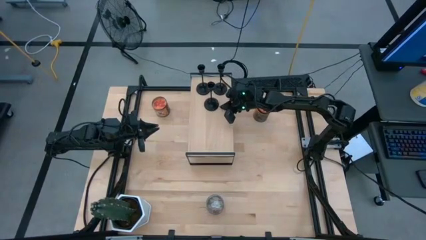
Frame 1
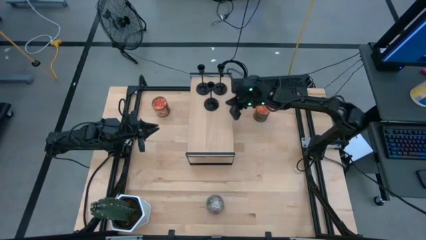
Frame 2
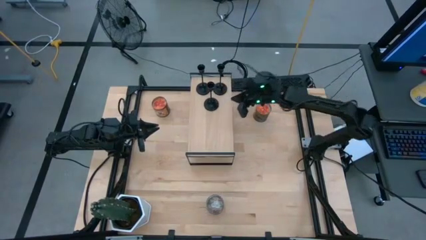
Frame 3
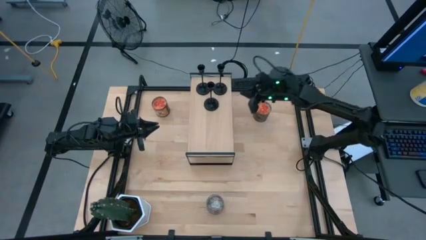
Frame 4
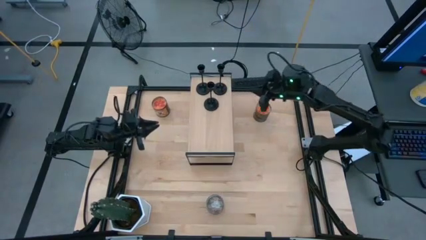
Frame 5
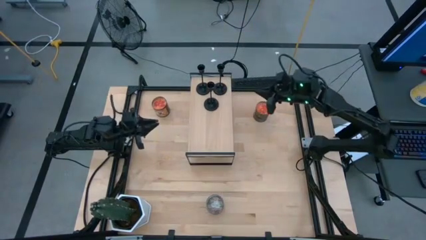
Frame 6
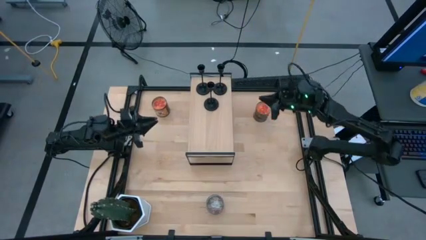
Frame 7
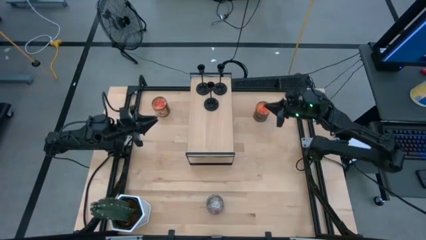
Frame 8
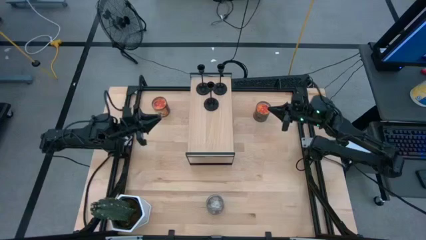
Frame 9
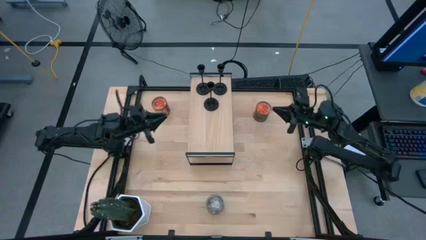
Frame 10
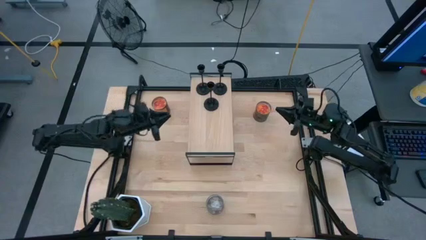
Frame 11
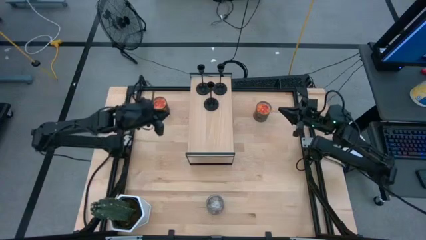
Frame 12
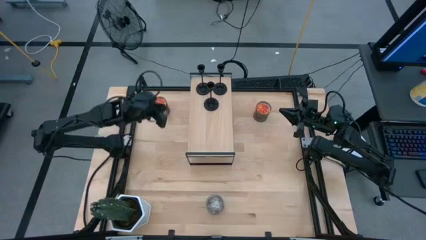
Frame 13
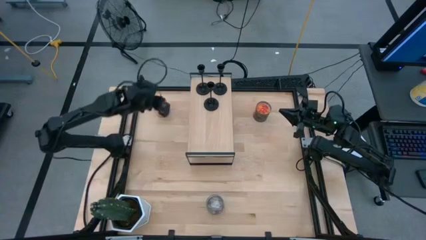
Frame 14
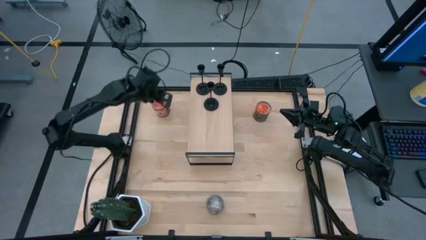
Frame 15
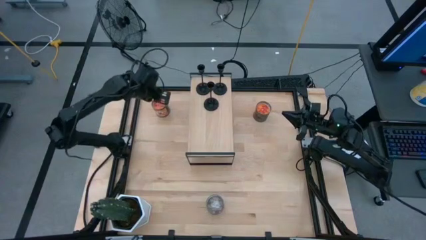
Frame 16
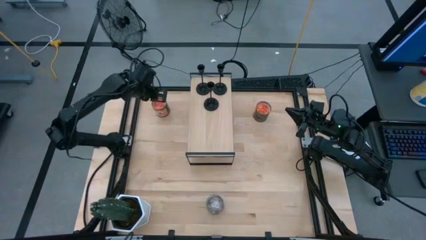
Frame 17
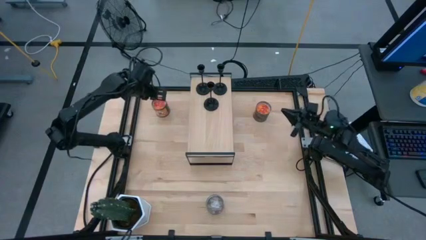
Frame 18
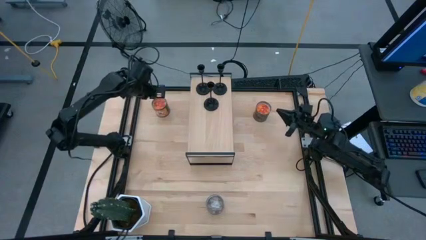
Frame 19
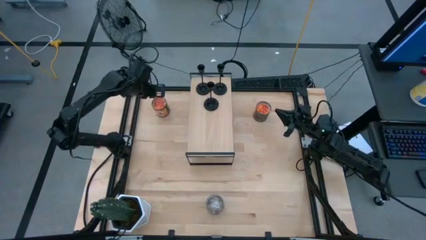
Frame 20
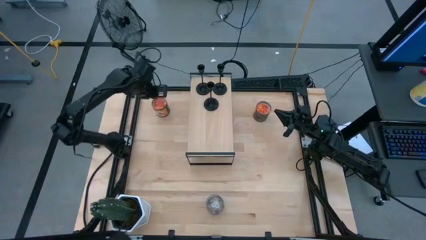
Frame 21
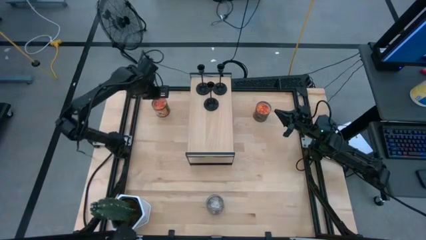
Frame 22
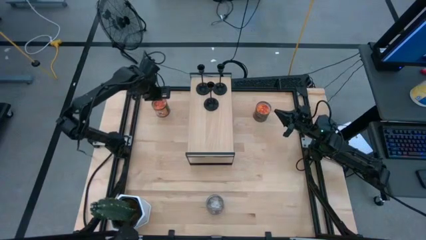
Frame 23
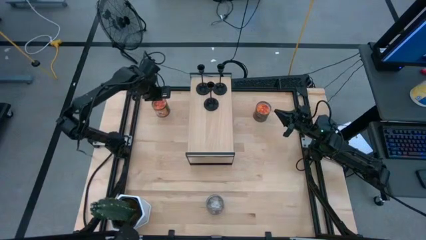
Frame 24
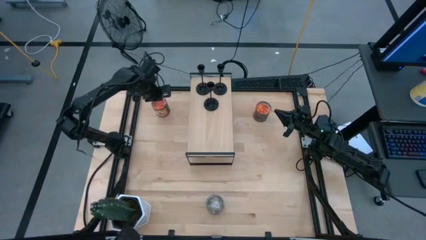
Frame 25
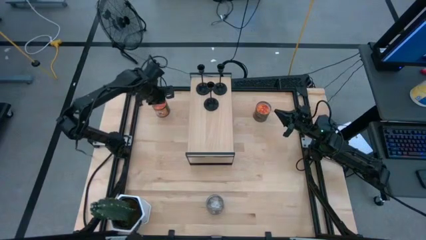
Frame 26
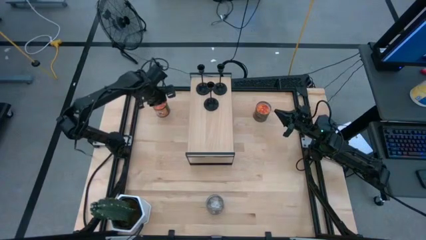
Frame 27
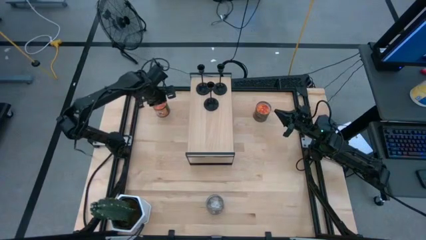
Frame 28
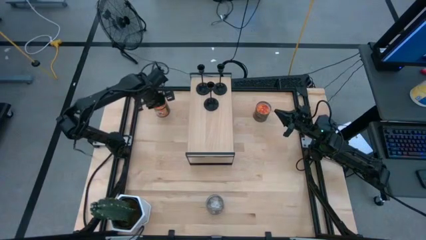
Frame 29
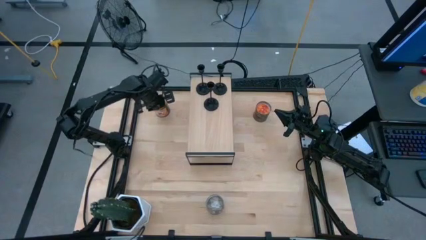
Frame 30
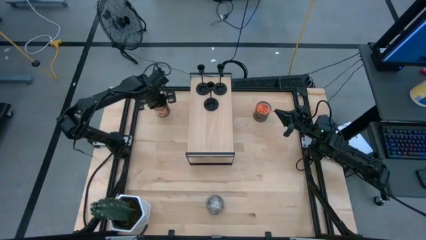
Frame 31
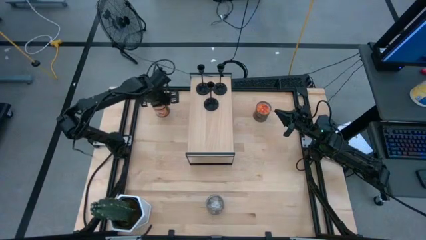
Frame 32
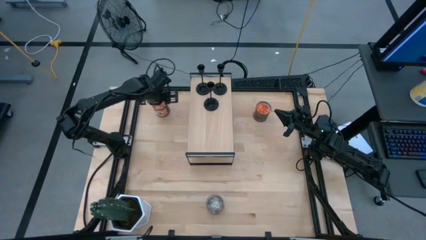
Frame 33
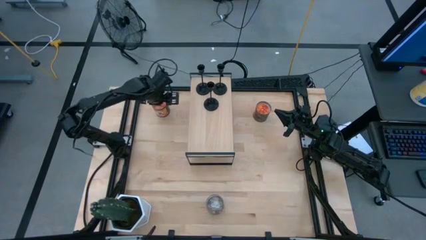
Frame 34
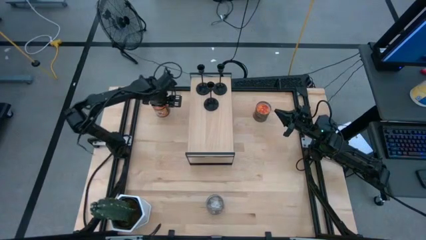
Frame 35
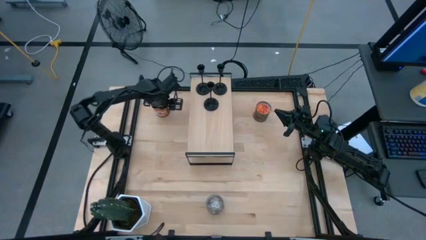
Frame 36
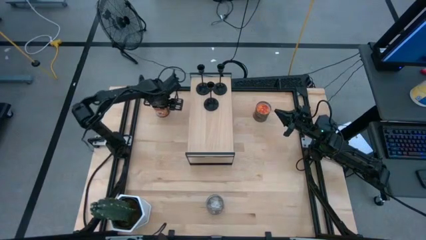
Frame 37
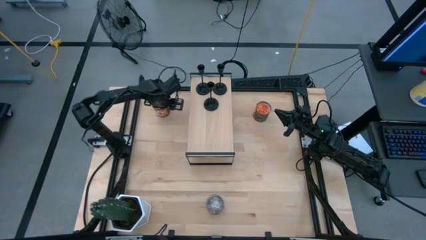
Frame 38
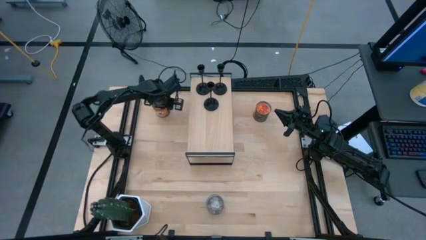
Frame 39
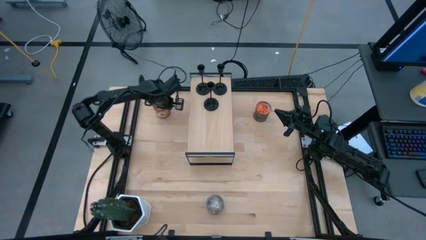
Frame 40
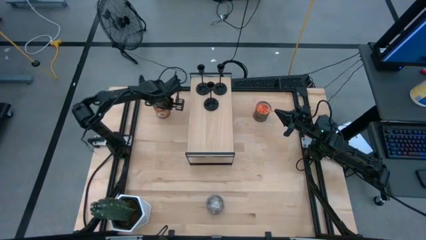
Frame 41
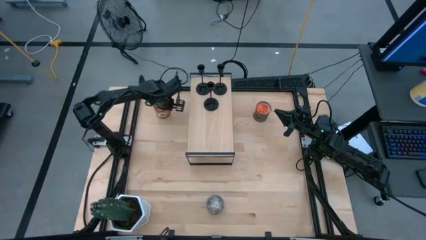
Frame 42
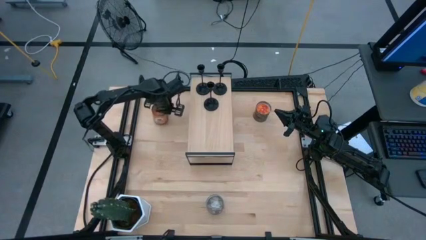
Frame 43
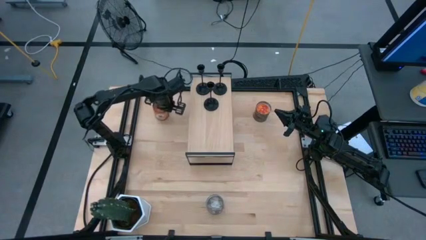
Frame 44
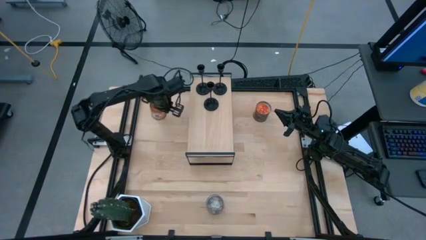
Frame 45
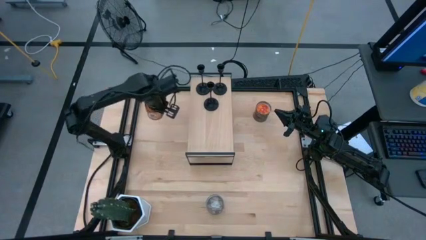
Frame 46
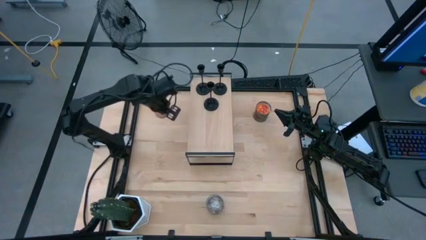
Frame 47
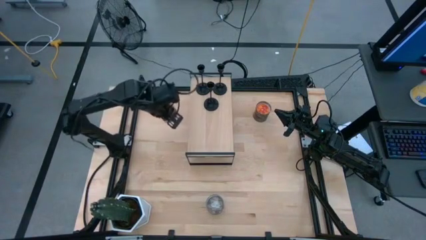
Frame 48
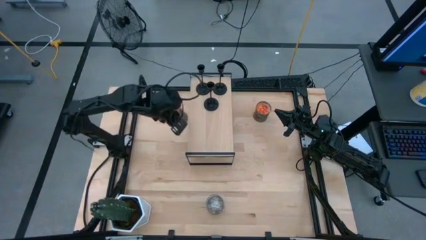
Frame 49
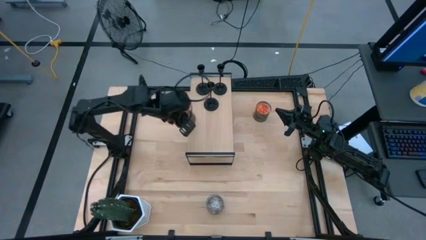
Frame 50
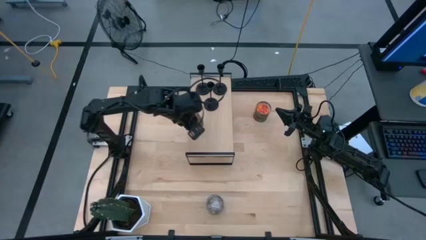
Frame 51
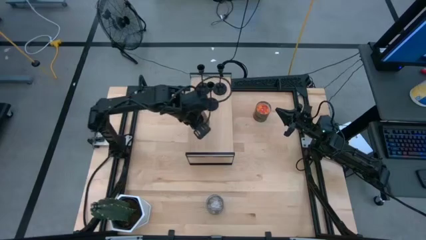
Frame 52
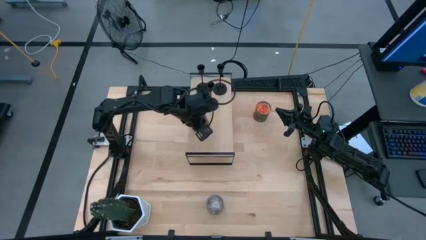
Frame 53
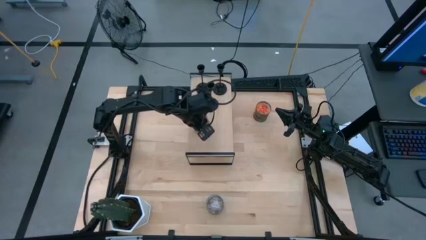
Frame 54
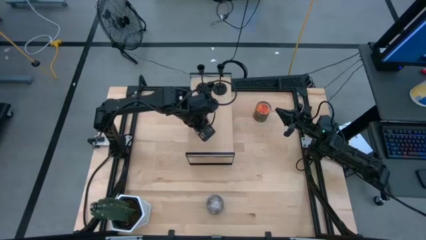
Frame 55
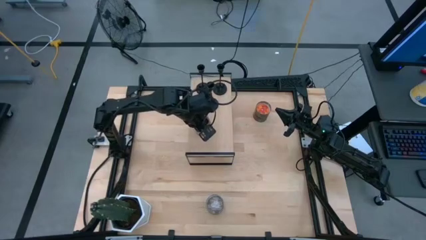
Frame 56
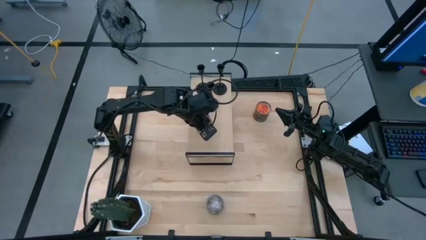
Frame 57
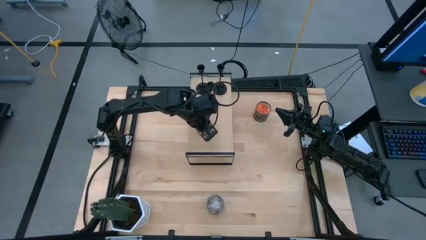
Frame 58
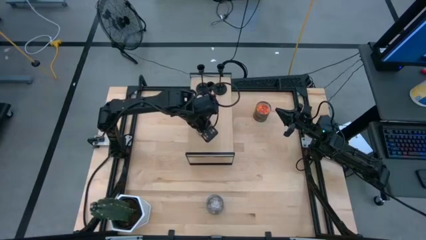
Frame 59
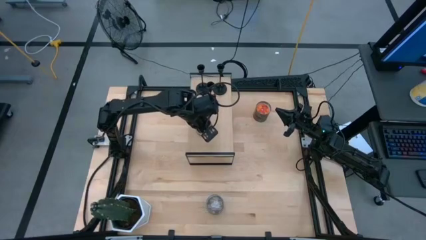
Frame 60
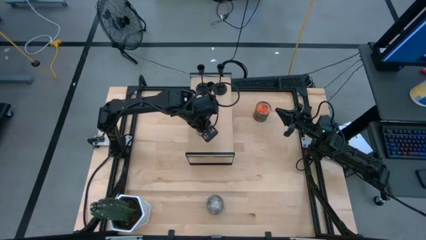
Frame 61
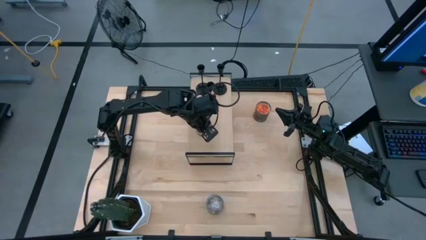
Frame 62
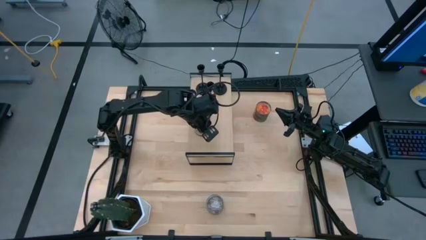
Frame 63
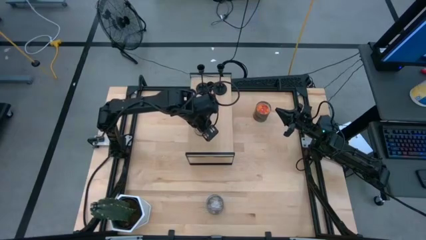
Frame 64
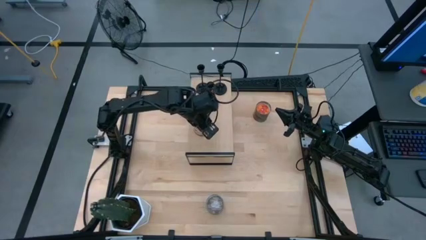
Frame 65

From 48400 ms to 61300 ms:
Task: Pick & Place candle stick holders
Put the left orange scented candle on the shelf
